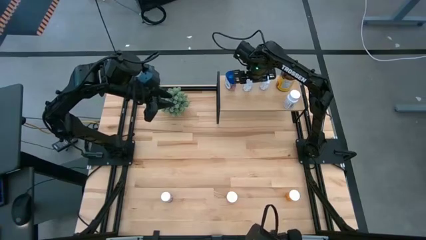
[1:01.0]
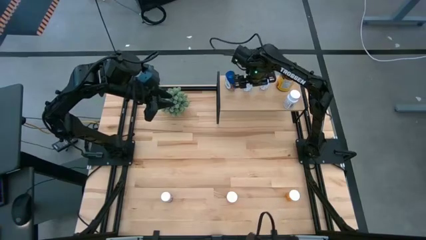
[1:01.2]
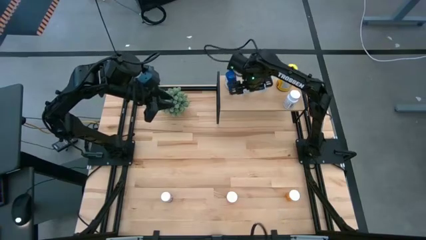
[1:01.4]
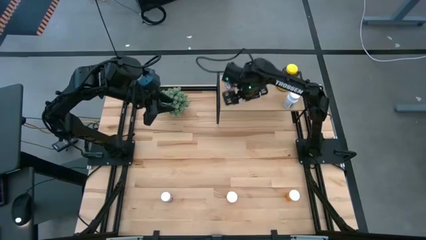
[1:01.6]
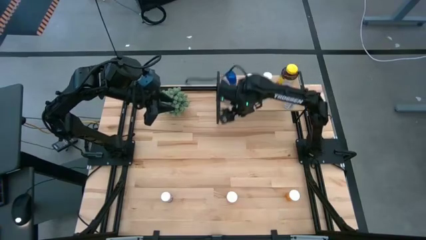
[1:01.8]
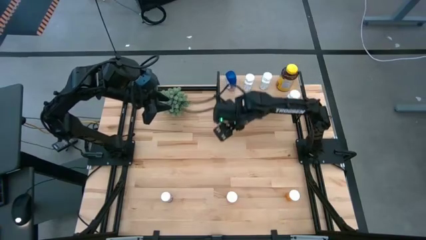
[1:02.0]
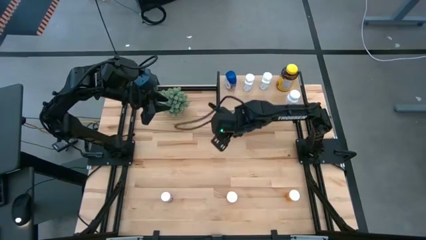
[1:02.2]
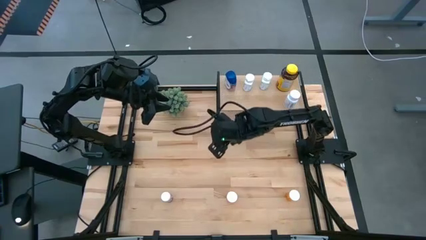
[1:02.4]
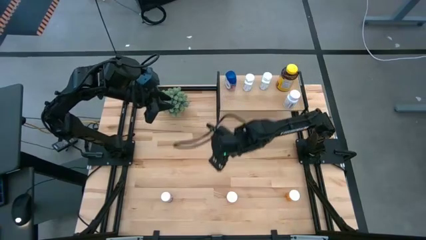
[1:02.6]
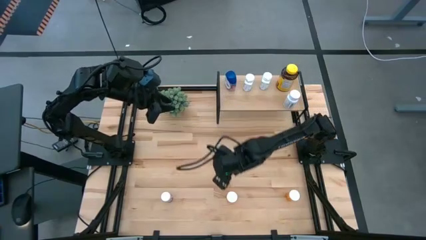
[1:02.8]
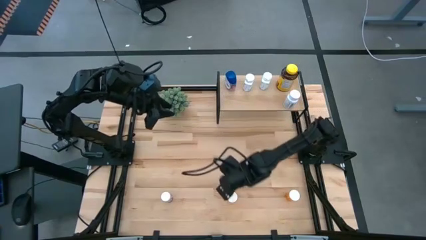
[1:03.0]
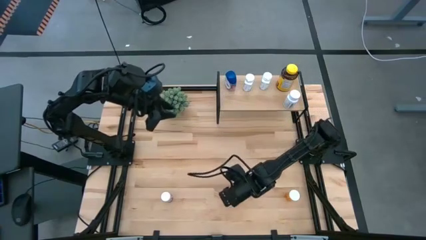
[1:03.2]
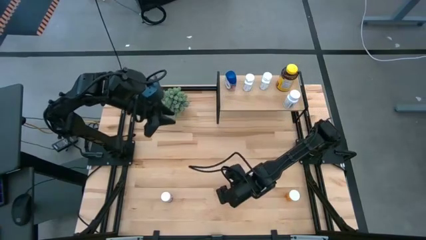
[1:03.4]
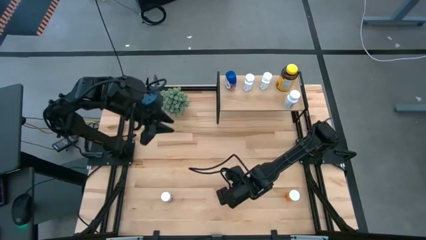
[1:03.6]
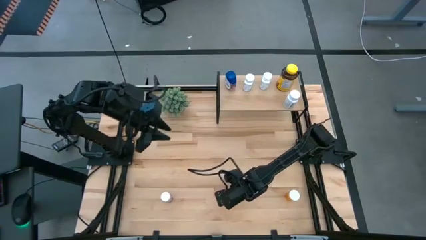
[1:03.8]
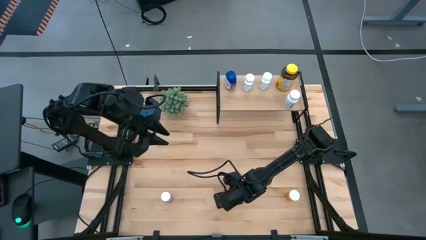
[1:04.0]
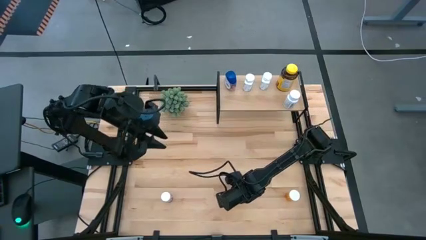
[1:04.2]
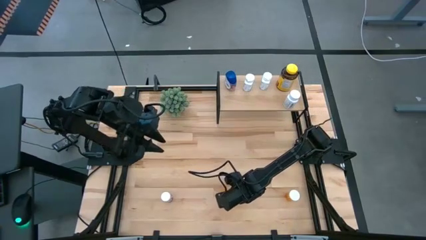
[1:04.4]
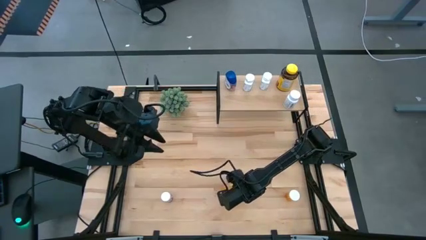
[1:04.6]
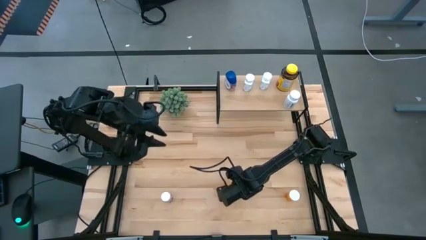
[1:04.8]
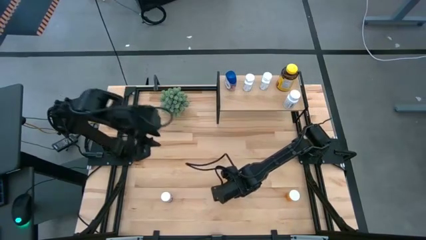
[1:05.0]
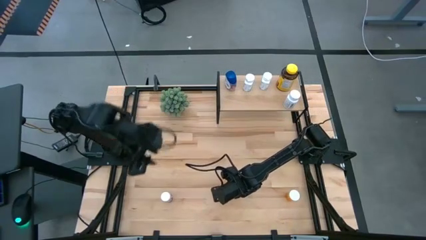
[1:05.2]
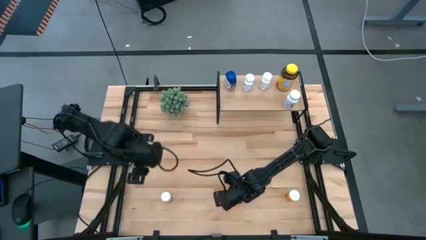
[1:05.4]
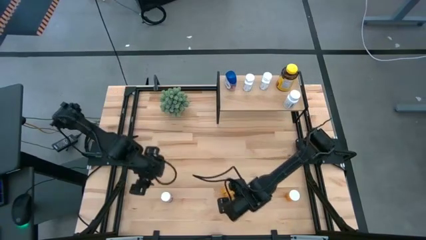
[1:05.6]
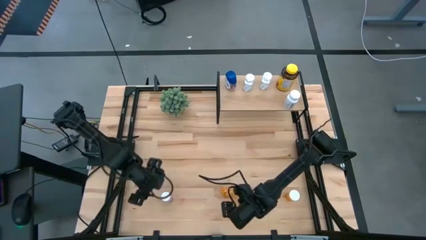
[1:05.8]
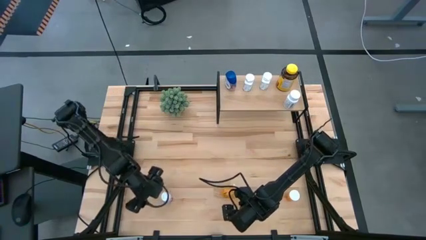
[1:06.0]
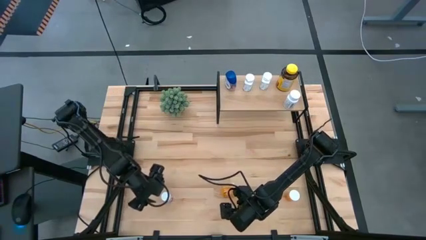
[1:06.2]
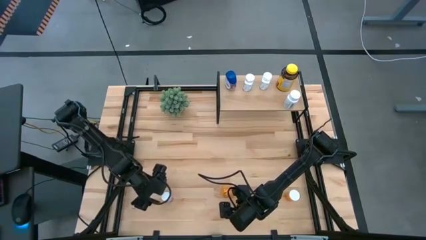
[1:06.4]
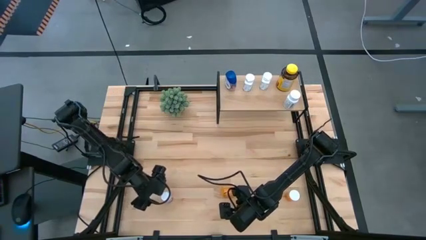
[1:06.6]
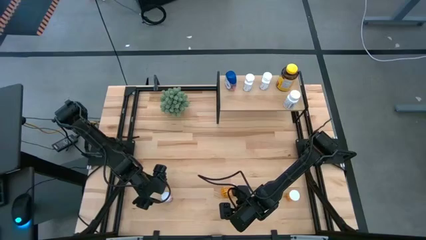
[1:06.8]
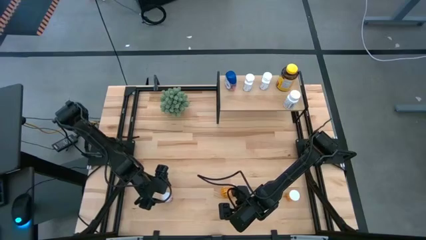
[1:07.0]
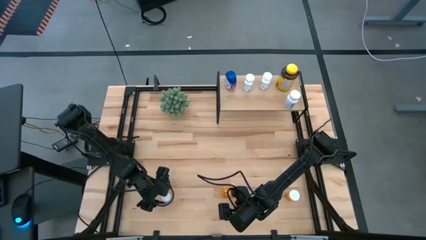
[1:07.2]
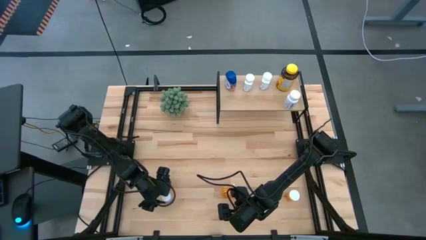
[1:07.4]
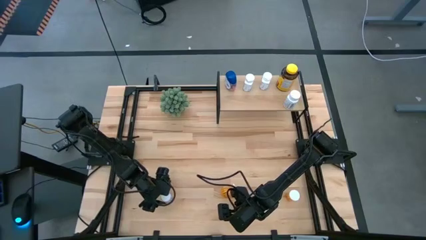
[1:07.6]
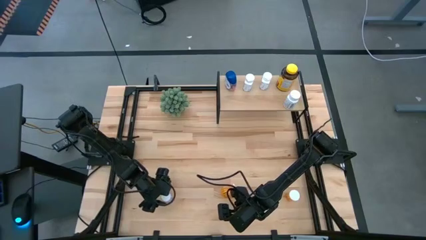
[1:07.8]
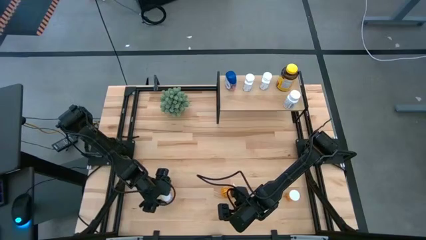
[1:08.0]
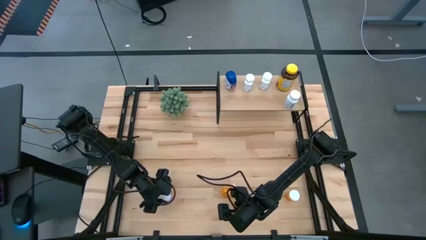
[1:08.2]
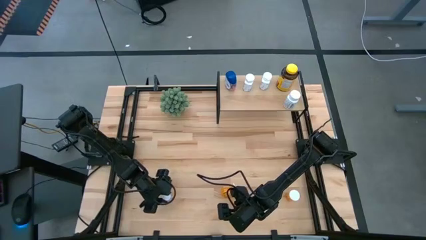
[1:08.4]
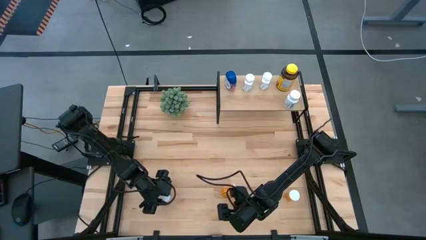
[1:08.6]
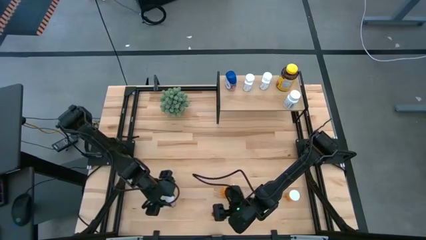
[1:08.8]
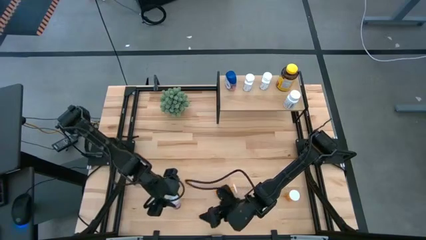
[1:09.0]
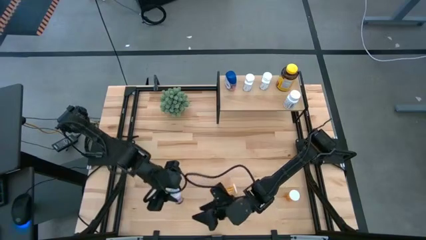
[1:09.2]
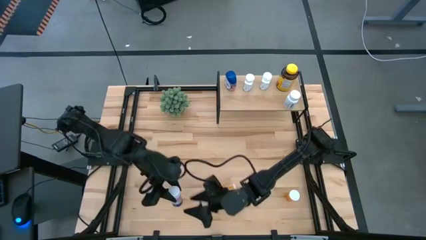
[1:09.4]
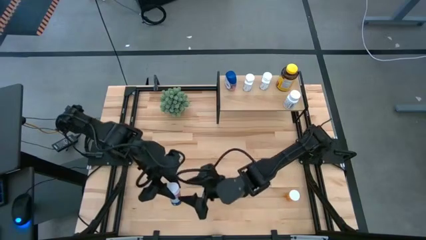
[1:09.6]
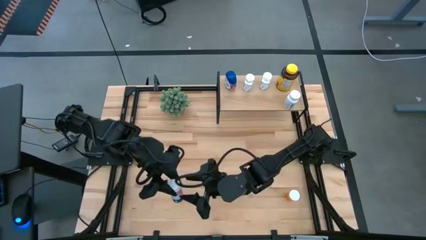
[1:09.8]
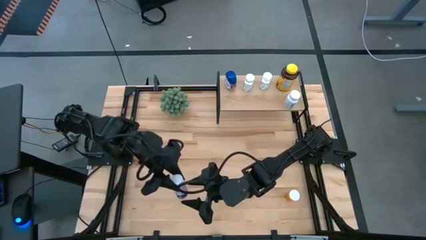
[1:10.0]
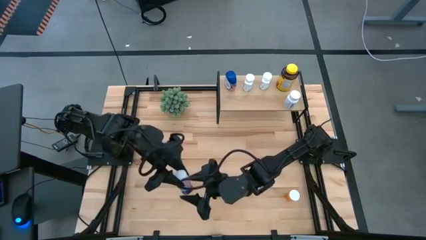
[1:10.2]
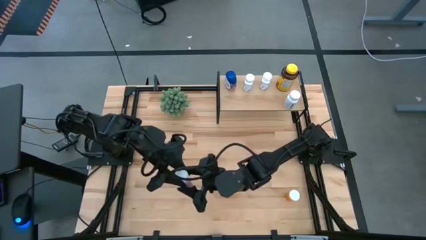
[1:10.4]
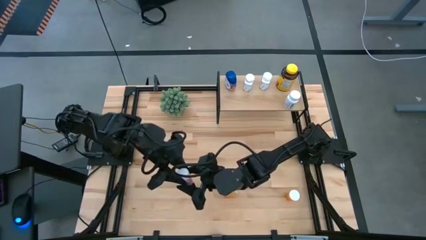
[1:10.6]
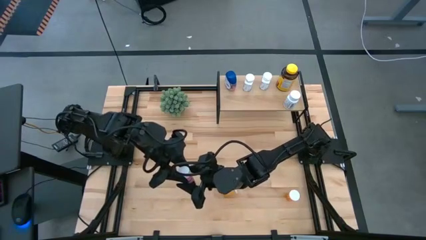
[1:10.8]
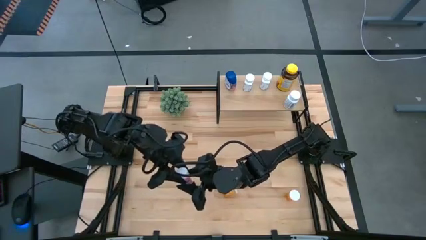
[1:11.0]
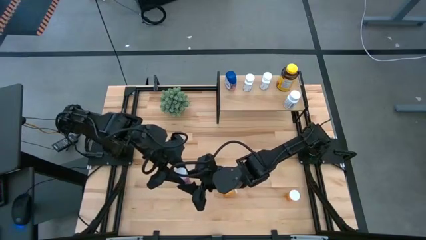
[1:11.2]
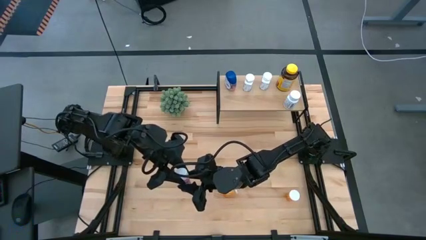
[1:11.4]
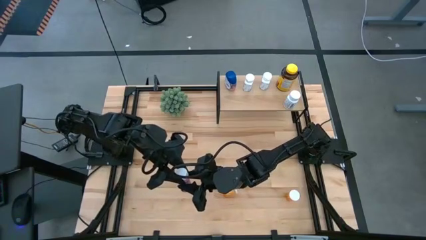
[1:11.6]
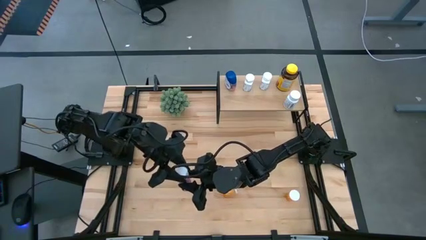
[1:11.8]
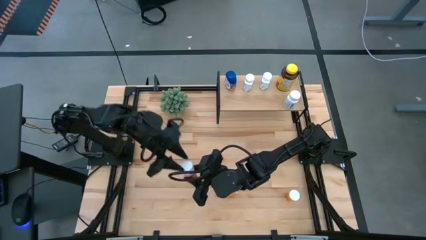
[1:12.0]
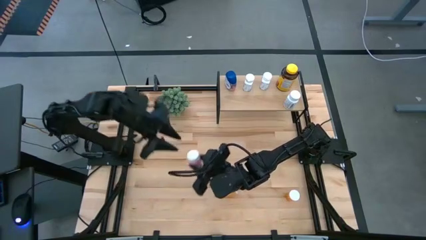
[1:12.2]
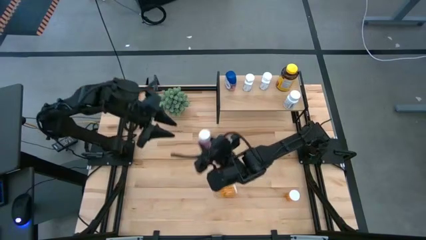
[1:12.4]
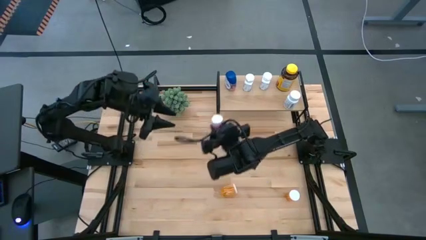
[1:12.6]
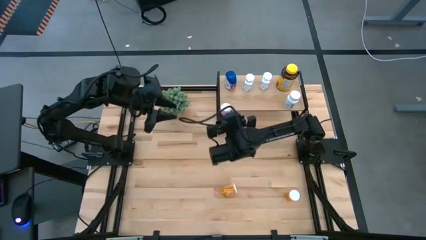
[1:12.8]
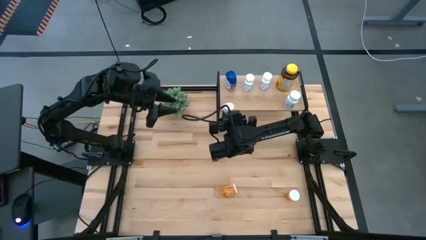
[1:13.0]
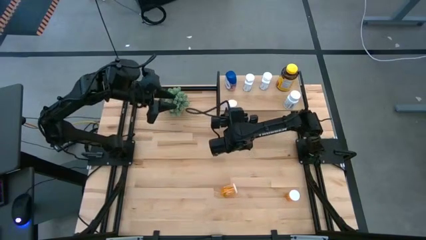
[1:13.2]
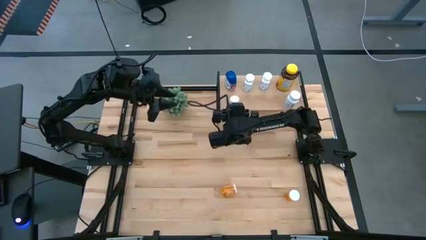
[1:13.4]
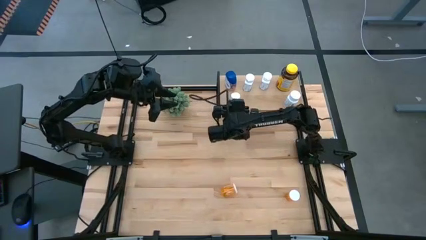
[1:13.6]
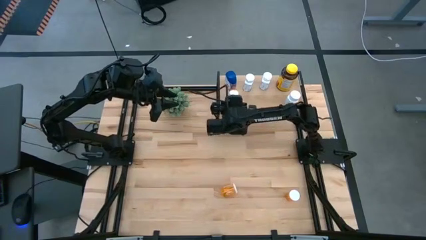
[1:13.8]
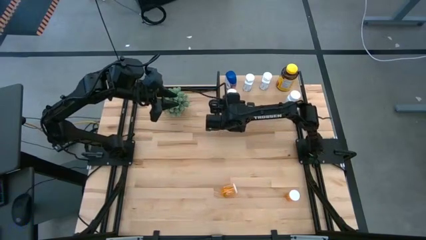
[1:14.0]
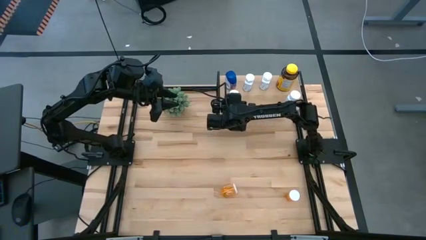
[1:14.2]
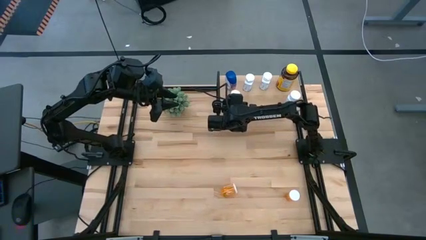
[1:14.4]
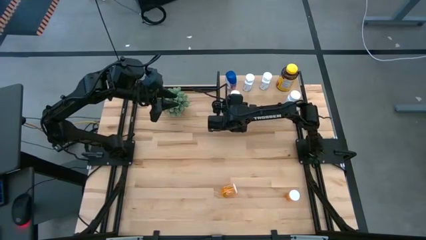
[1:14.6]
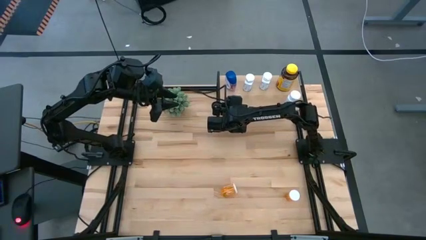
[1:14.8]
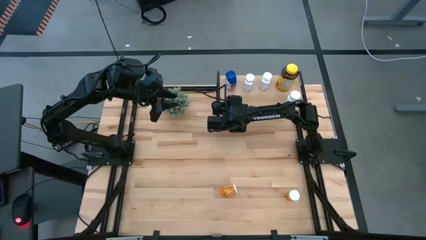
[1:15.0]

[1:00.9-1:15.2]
Task: Pick and place medicine bottles onto shelf by color
Put the pink medicine bottle on the shelf
